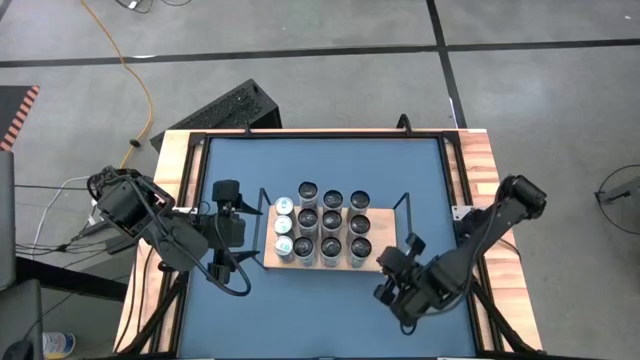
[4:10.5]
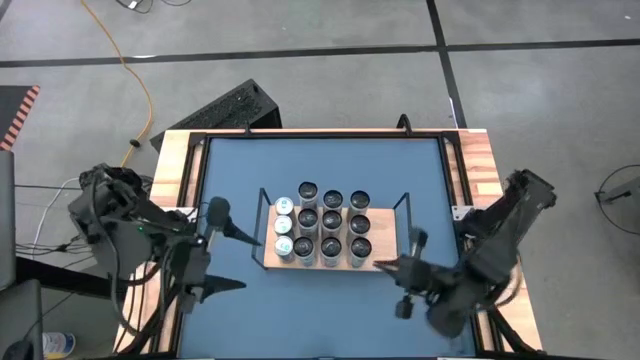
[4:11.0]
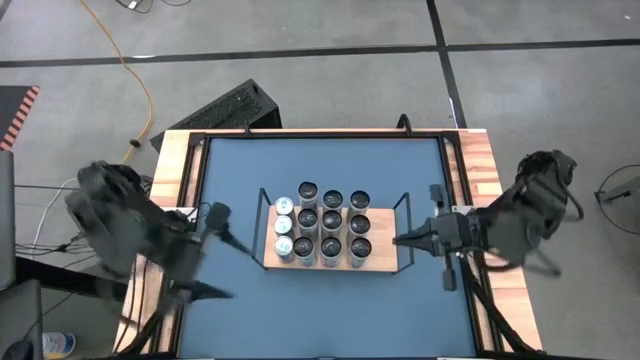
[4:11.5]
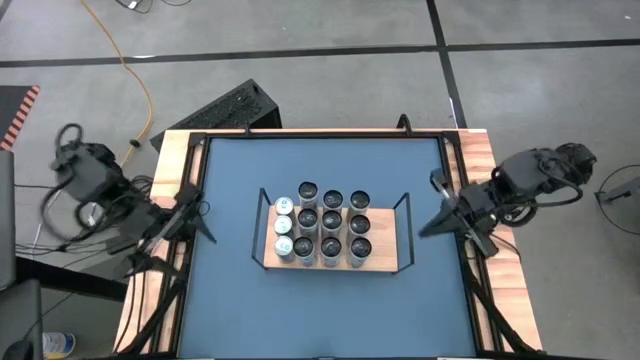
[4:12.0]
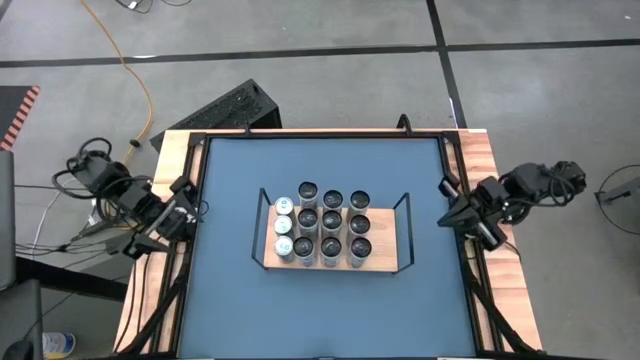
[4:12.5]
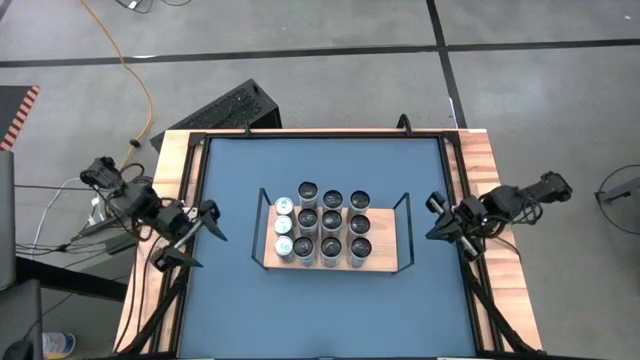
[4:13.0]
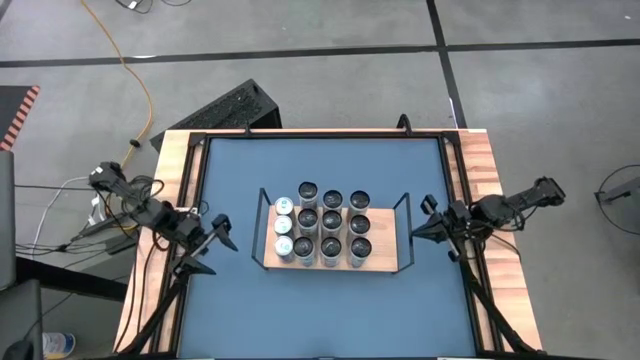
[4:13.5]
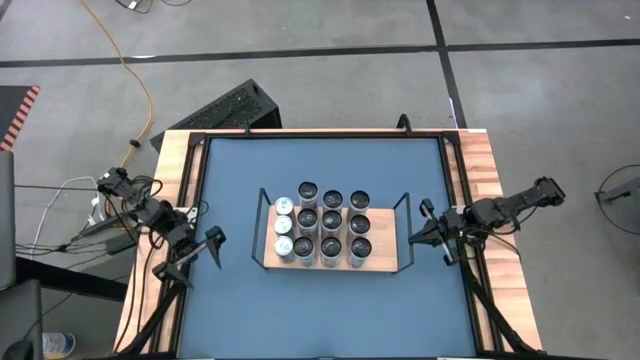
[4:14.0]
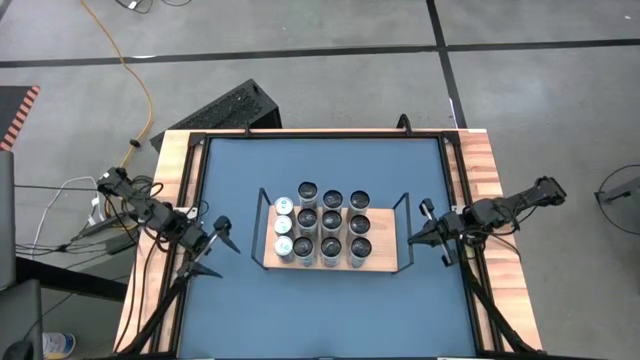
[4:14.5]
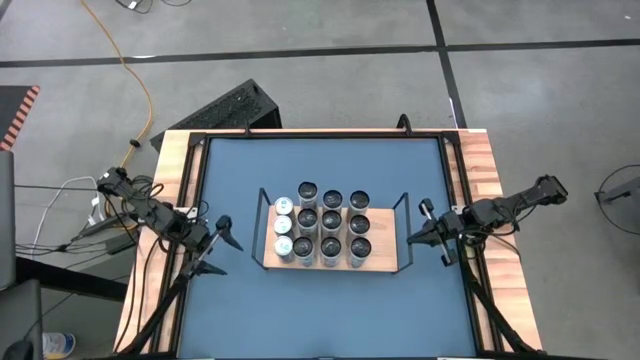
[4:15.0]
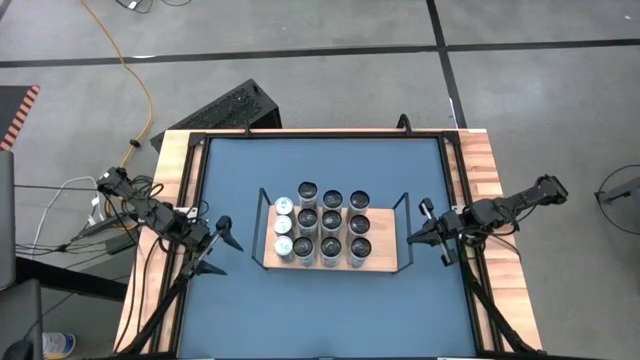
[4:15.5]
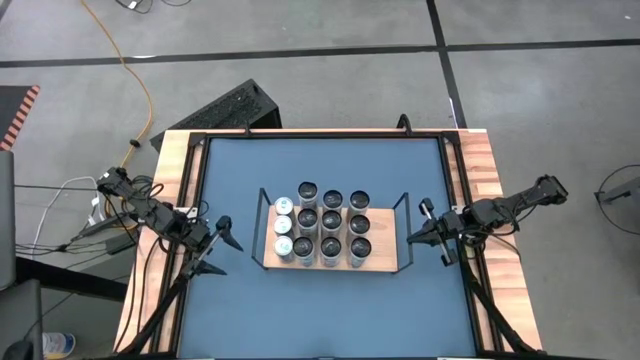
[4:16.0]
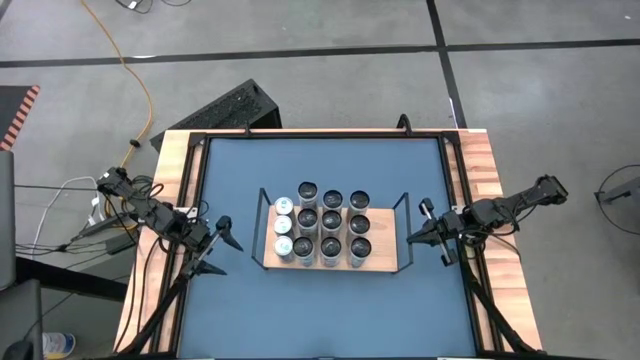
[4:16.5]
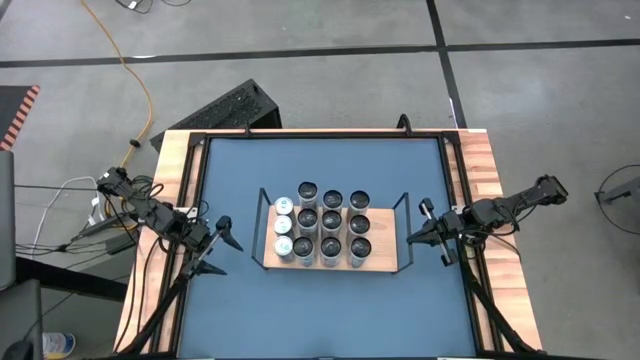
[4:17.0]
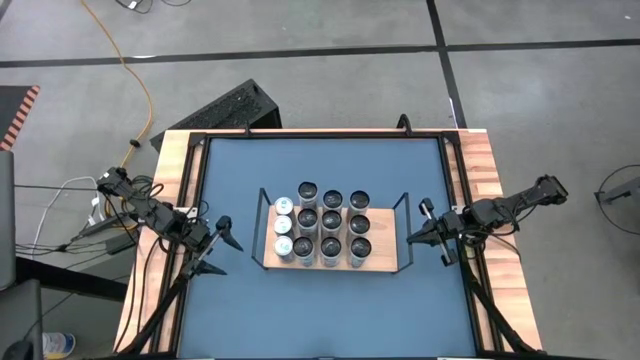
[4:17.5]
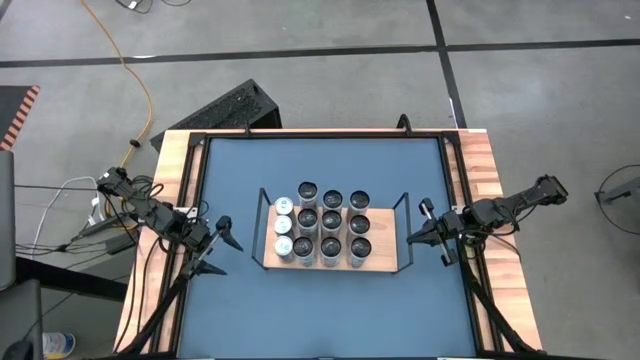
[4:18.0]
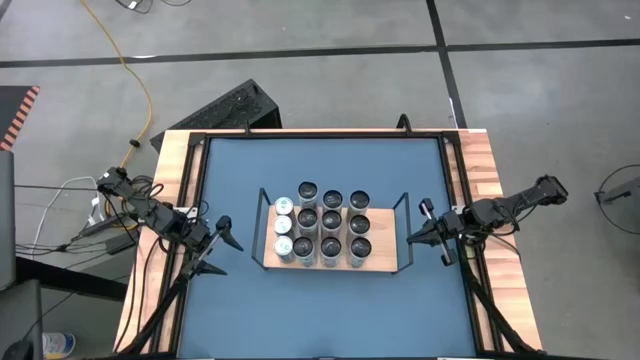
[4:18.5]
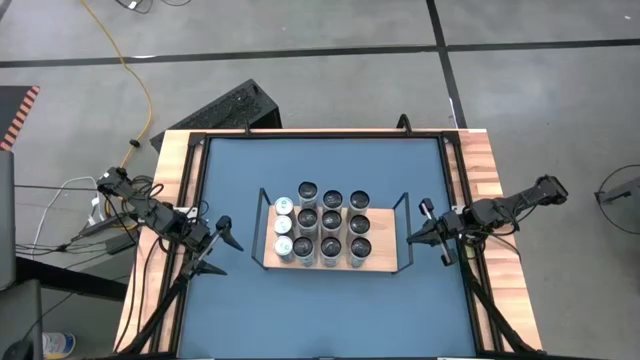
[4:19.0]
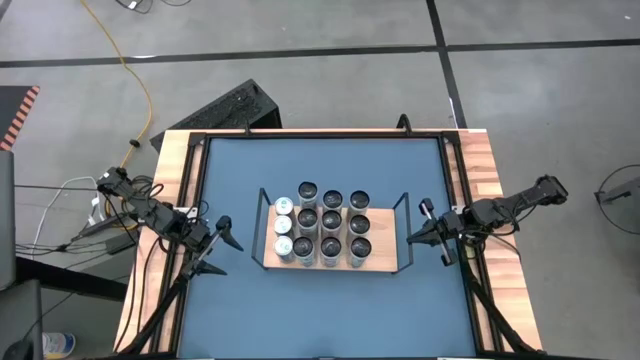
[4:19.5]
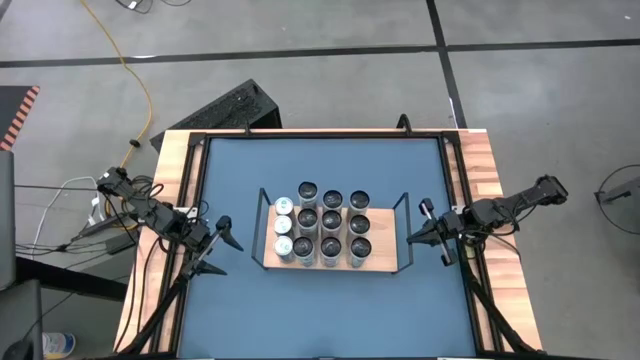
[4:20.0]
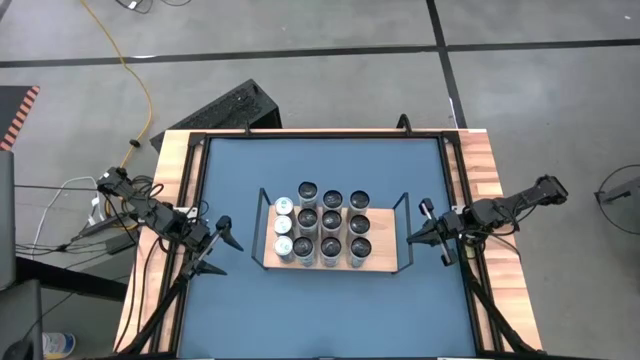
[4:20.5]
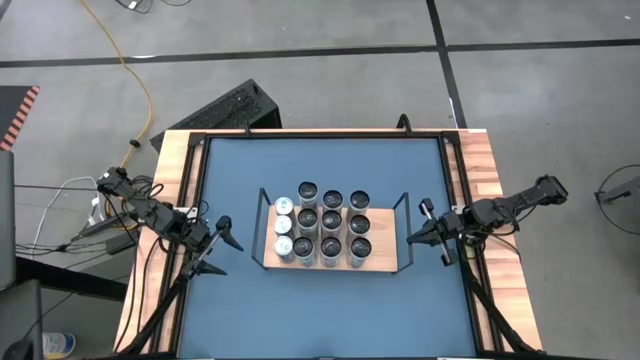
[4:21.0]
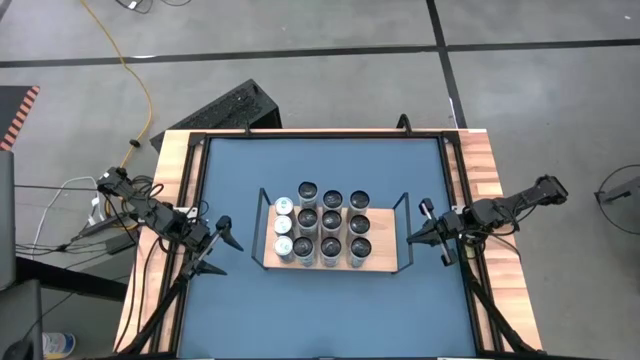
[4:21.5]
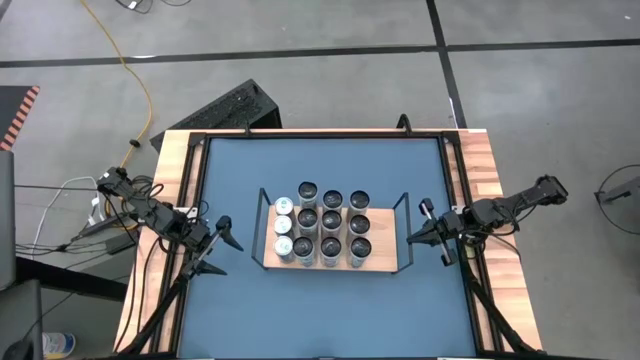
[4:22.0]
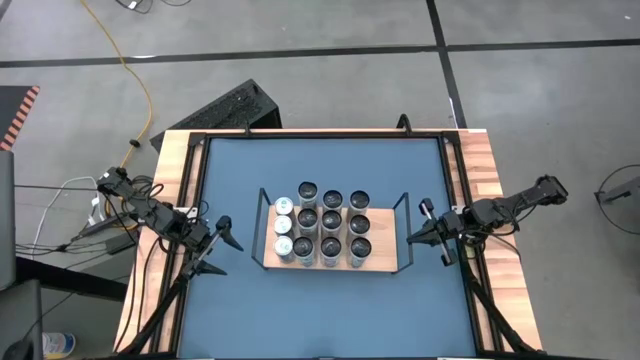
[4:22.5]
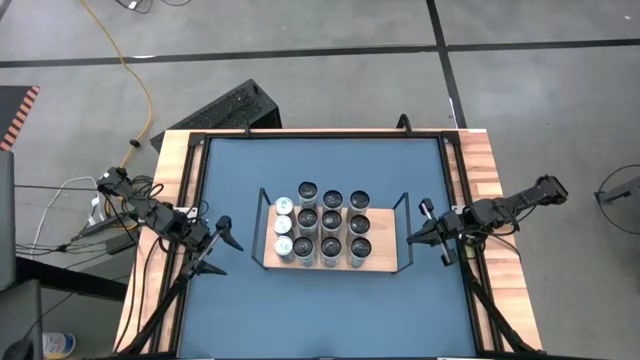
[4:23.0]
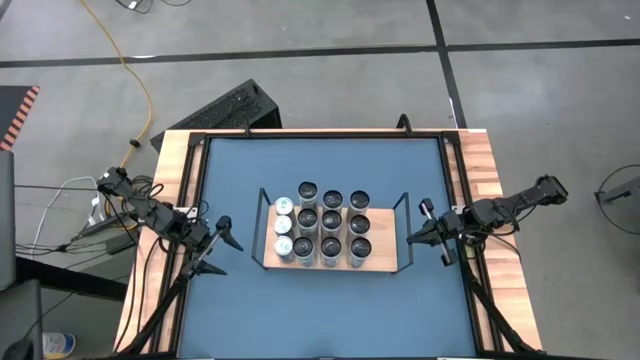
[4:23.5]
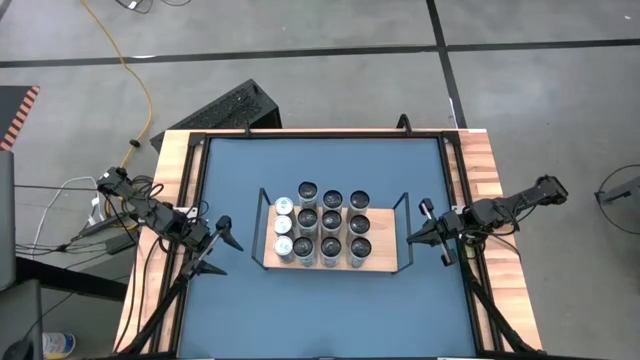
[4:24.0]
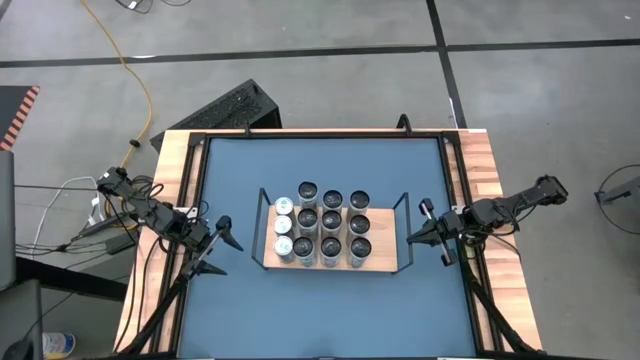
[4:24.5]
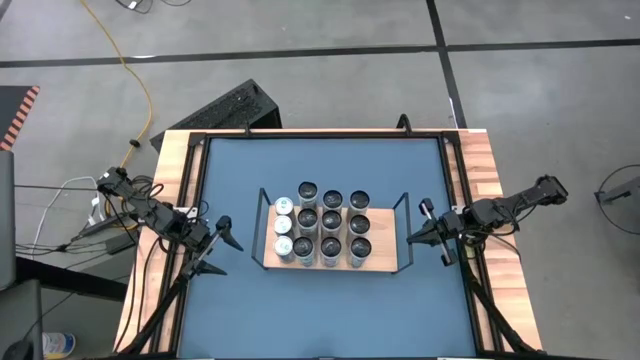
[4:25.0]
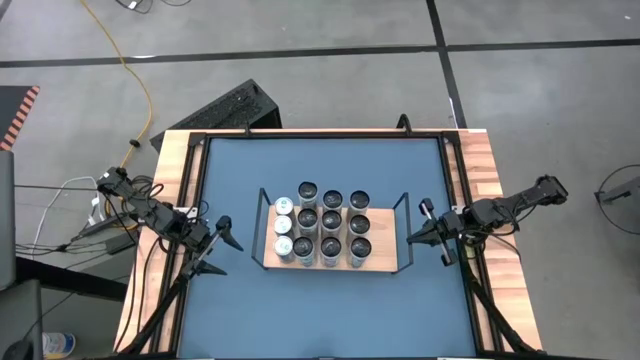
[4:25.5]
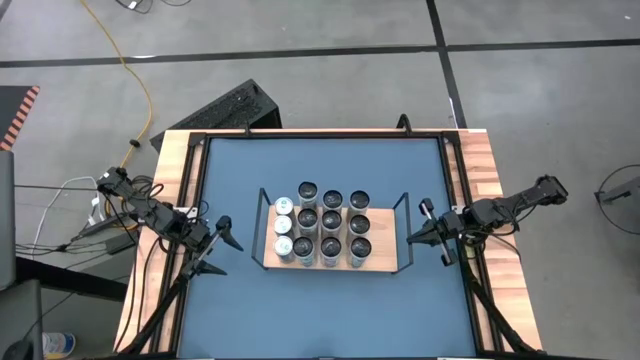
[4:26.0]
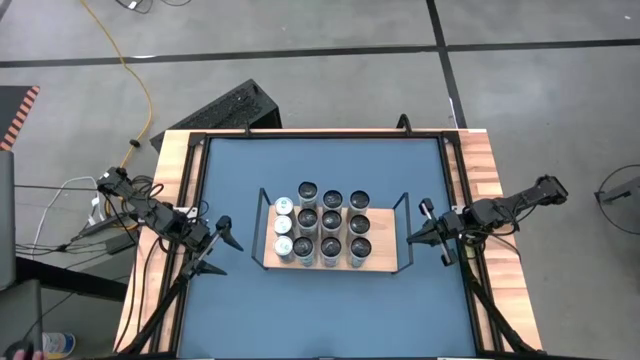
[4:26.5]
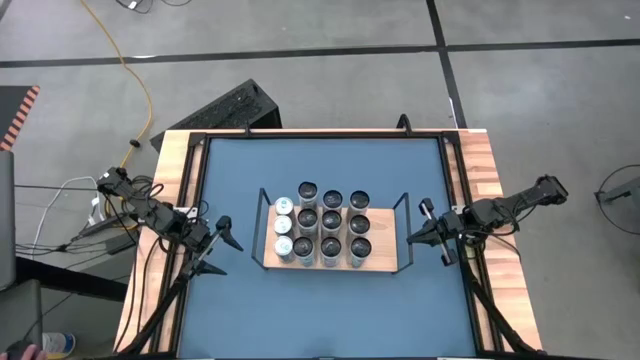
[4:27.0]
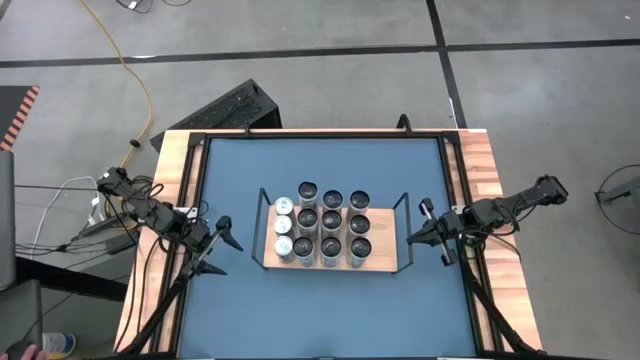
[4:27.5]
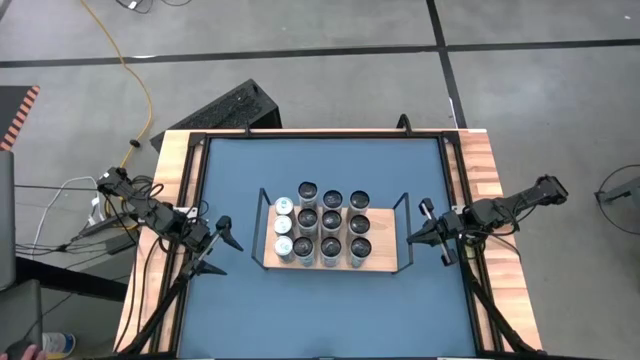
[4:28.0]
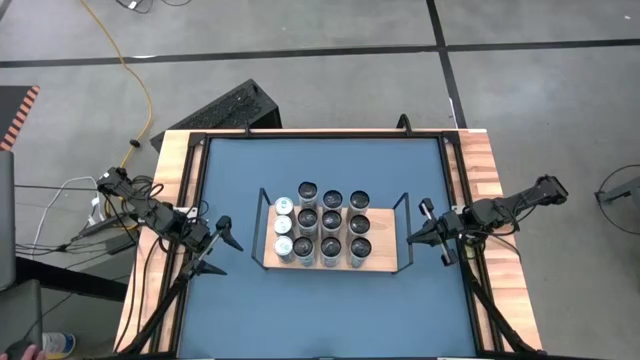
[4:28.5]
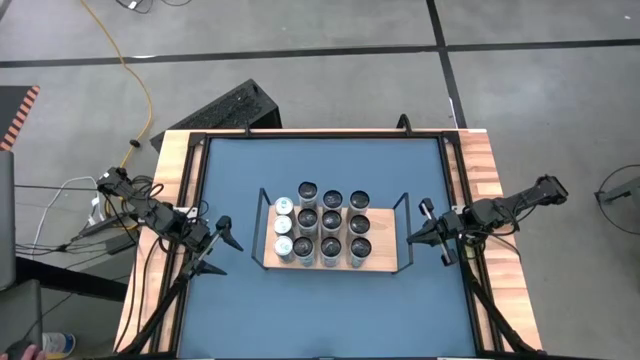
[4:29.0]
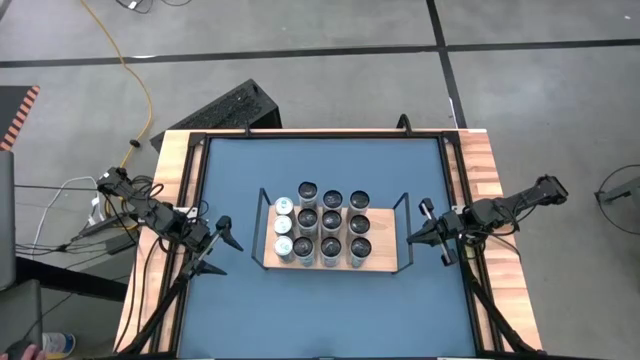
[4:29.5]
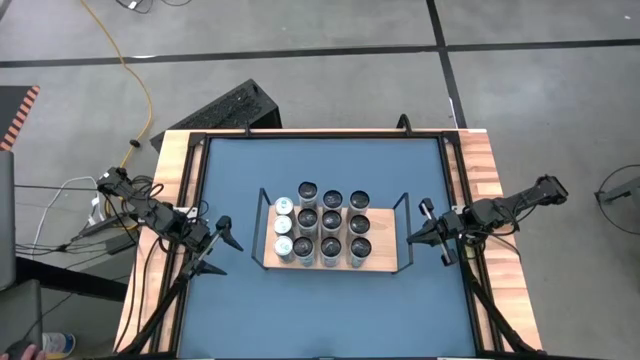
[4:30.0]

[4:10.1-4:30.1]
Task: Place canned beverage on shelf
Return to Home Position

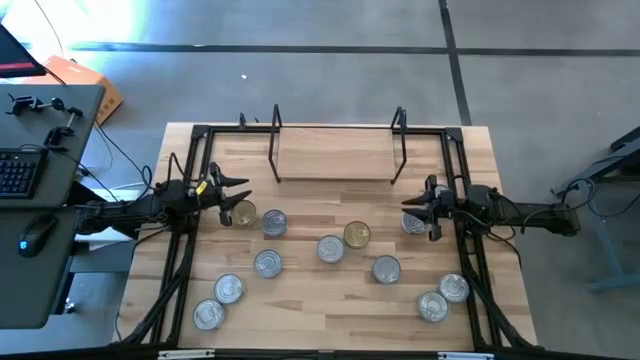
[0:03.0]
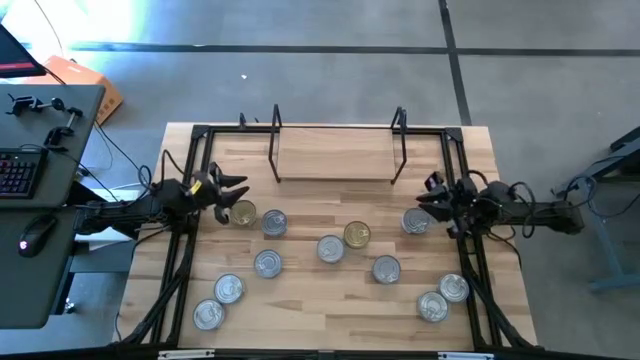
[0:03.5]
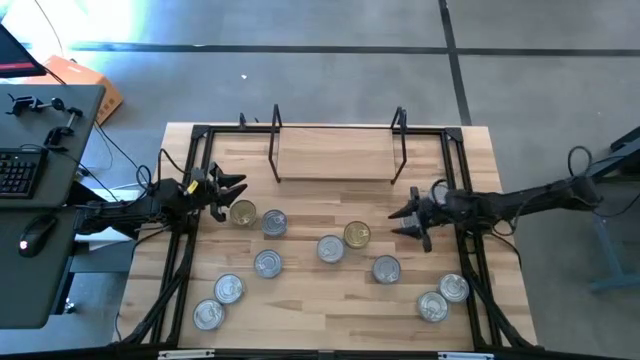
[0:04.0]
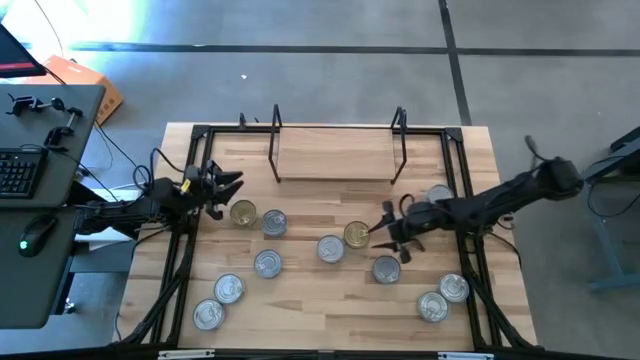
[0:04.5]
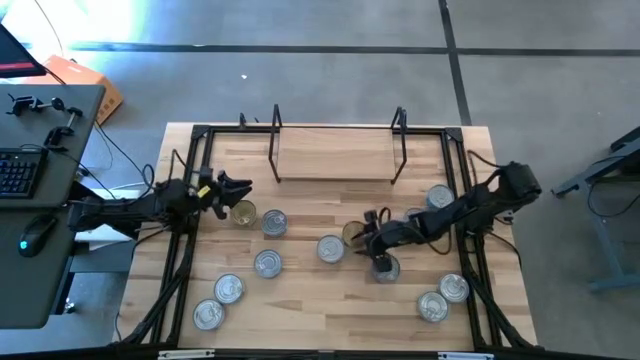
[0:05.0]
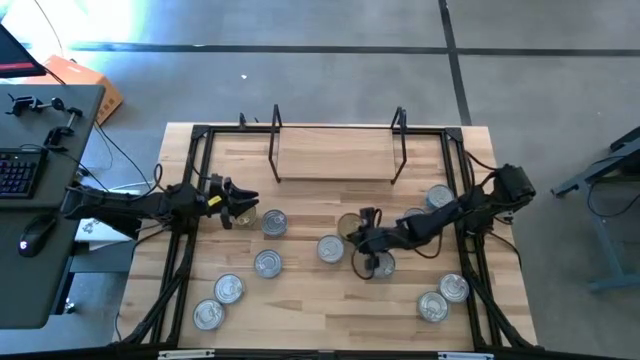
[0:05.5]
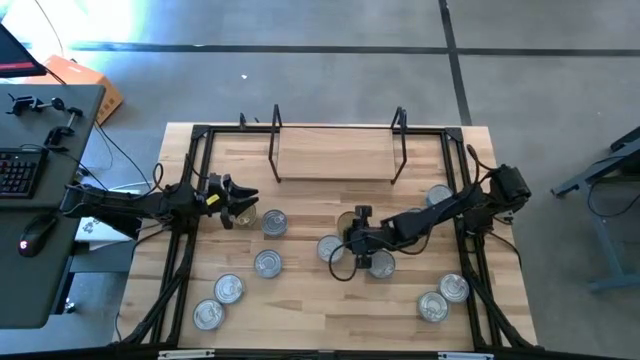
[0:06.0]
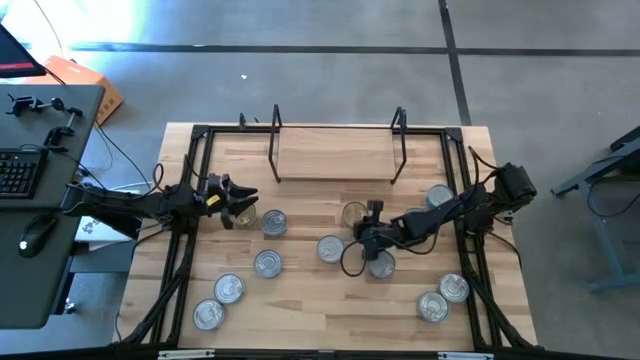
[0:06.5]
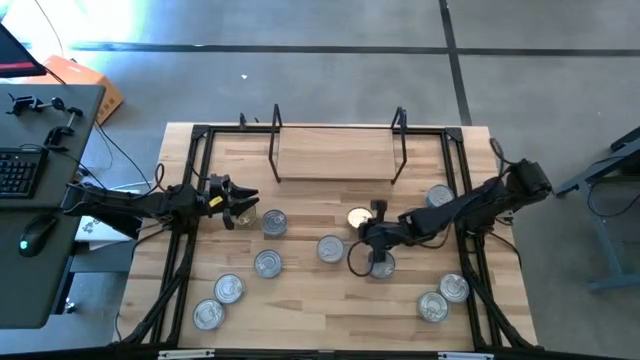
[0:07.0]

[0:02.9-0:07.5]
Task: Stack canned seafood by type on shelf
Put the green tuna can on the shelf
